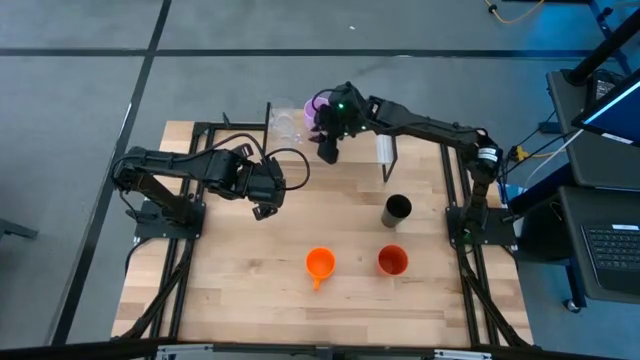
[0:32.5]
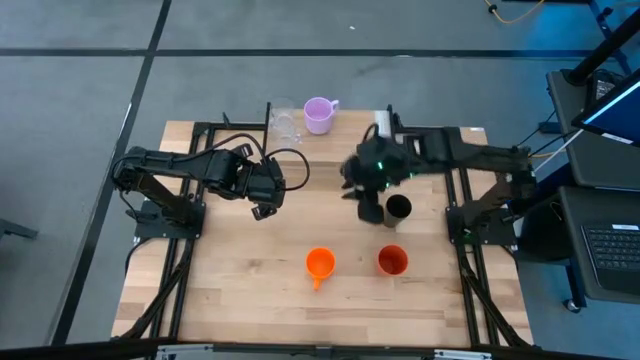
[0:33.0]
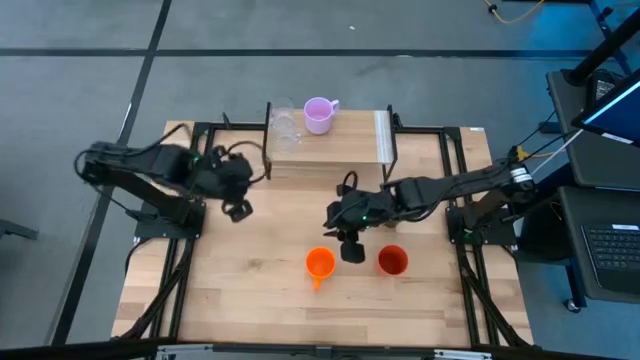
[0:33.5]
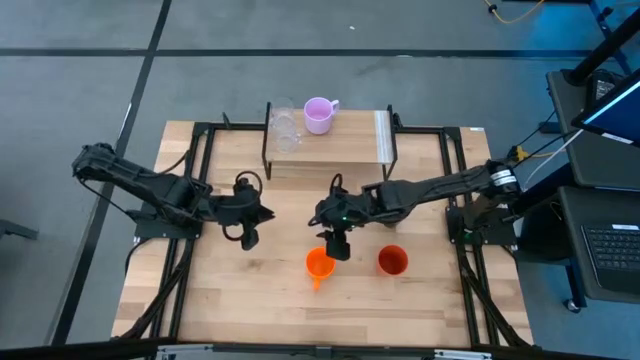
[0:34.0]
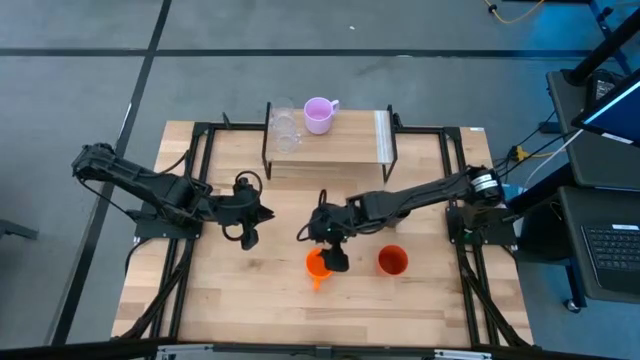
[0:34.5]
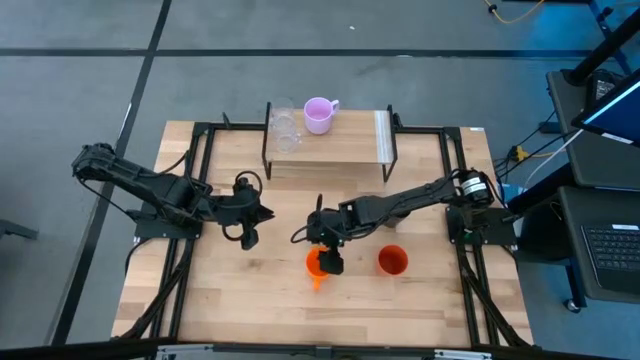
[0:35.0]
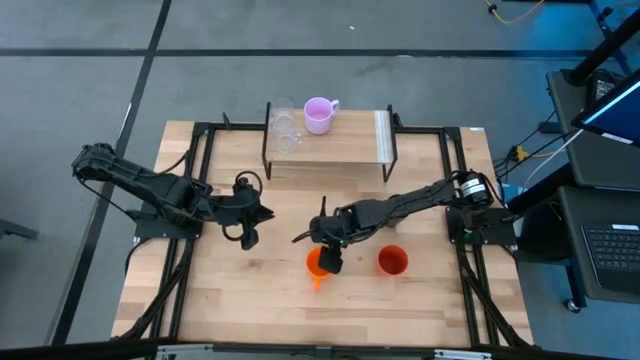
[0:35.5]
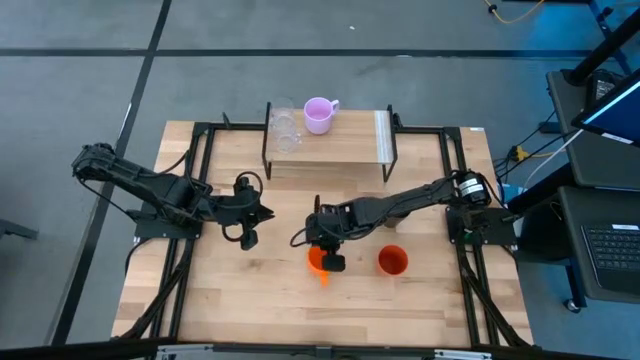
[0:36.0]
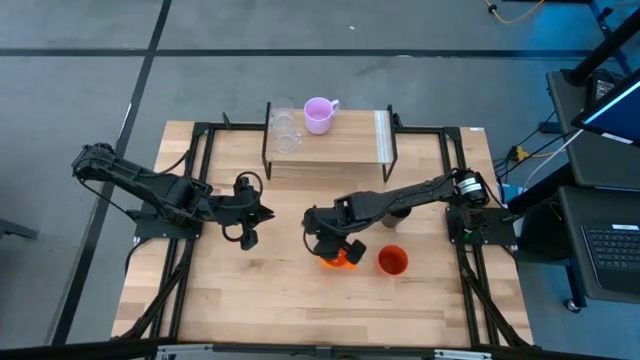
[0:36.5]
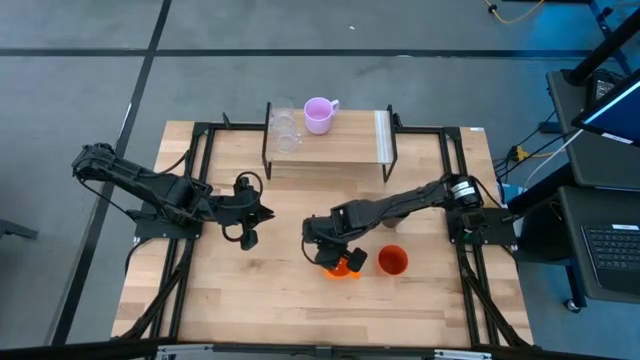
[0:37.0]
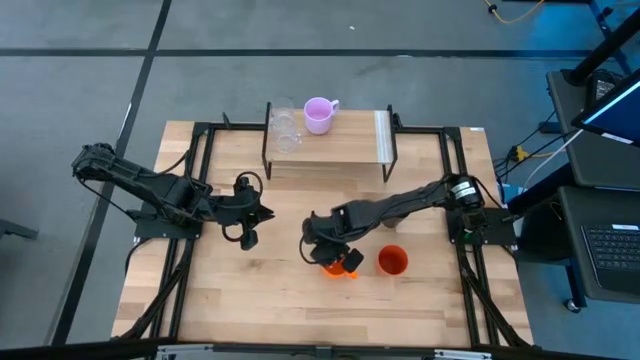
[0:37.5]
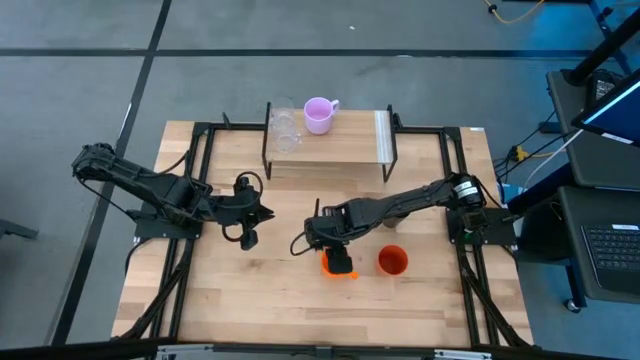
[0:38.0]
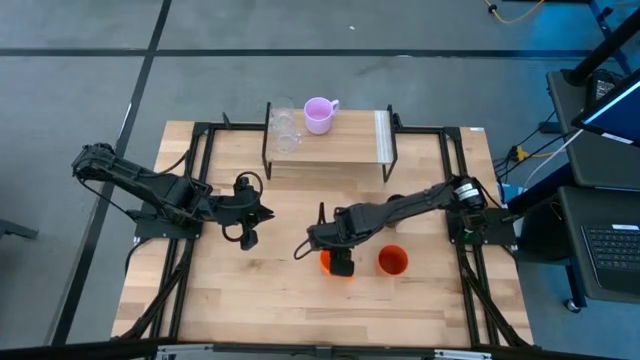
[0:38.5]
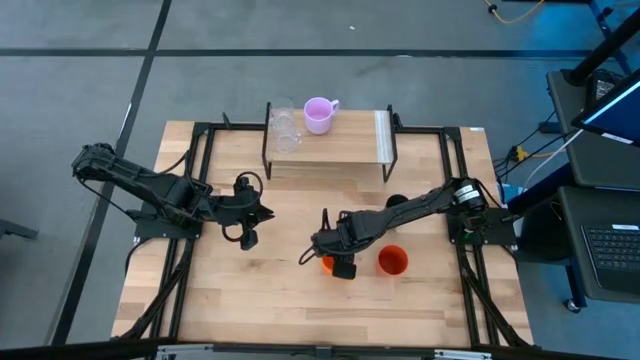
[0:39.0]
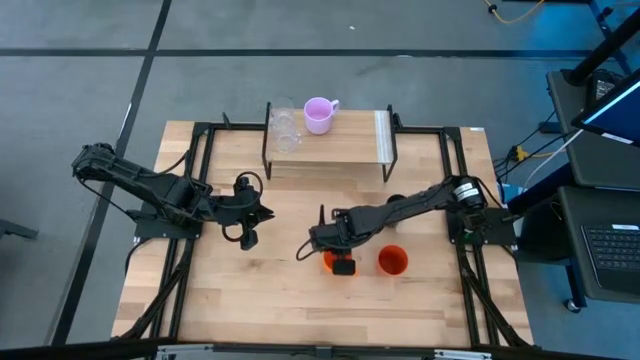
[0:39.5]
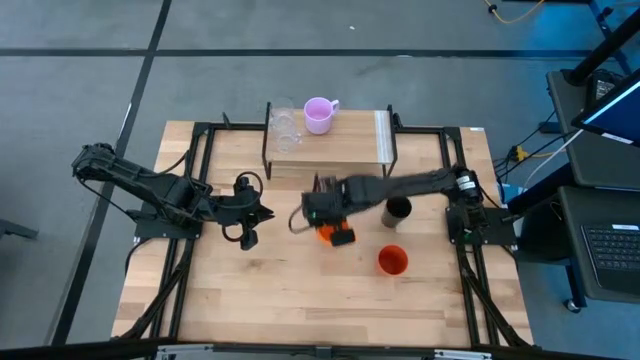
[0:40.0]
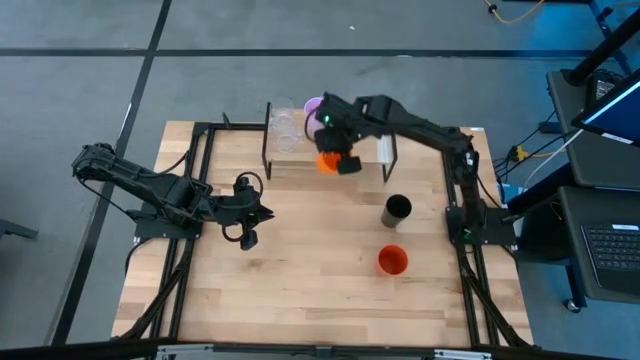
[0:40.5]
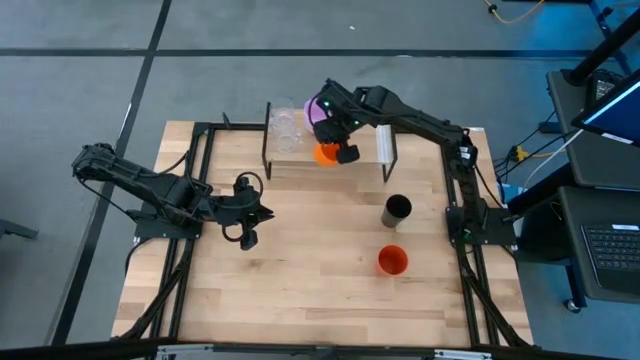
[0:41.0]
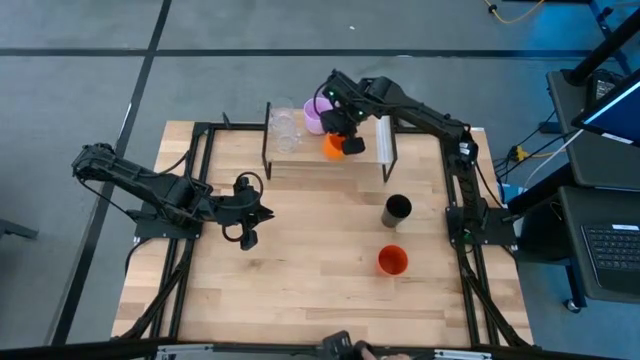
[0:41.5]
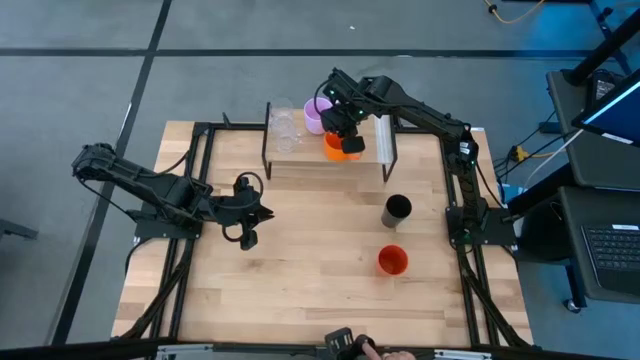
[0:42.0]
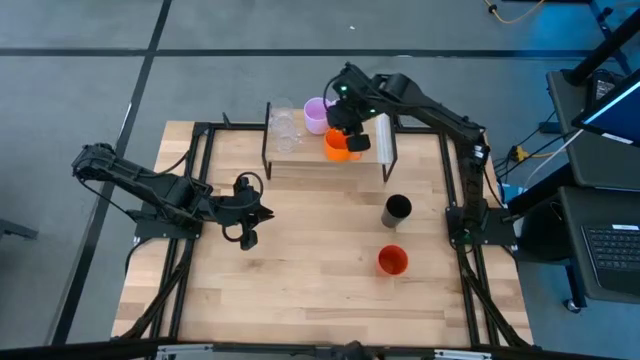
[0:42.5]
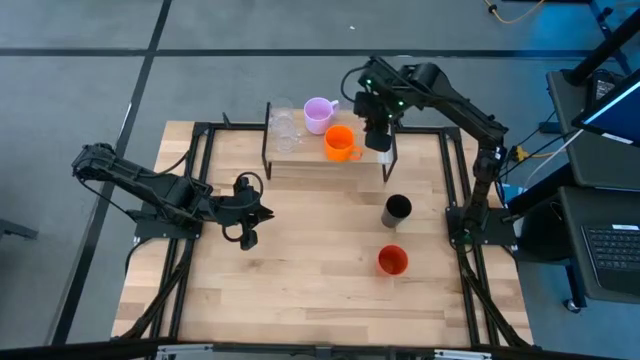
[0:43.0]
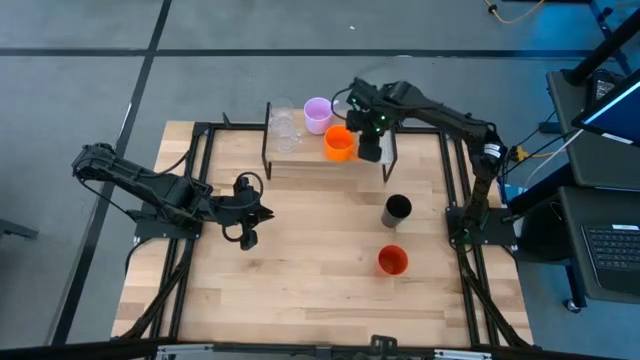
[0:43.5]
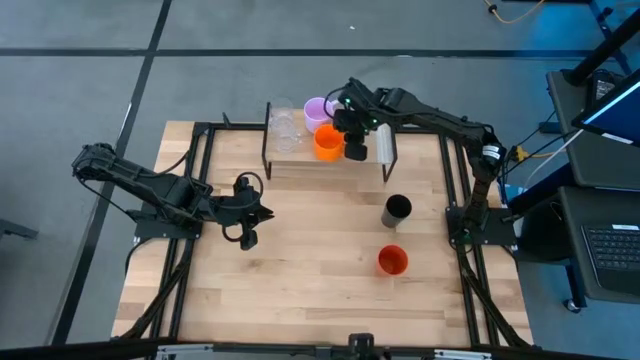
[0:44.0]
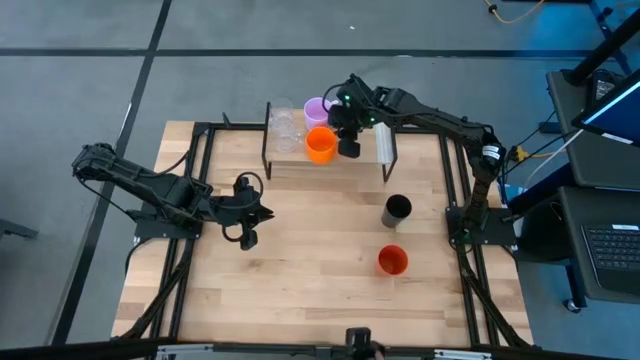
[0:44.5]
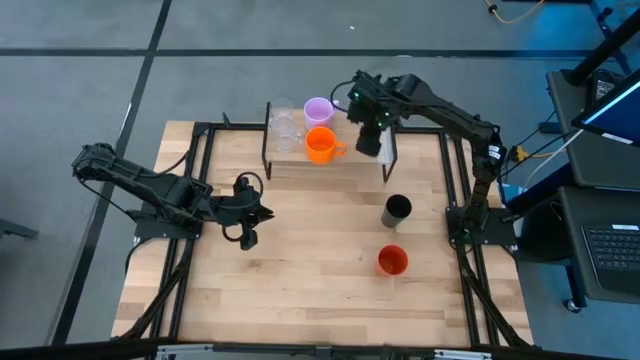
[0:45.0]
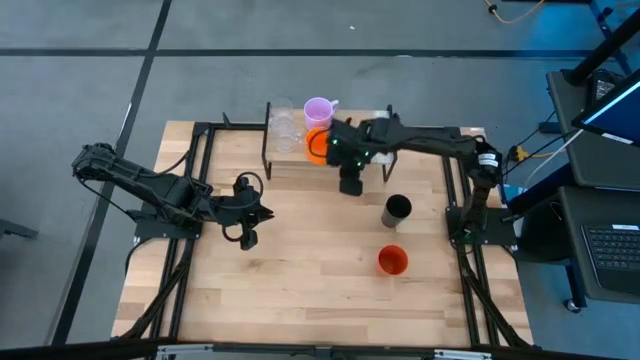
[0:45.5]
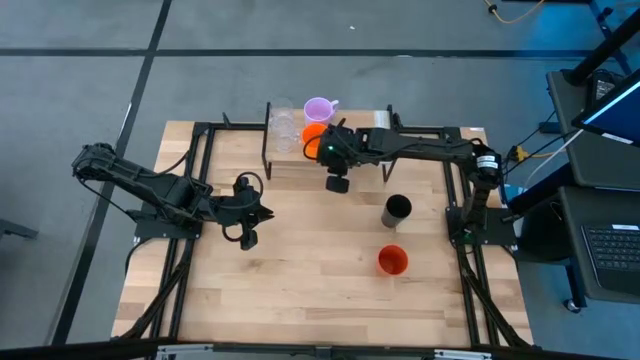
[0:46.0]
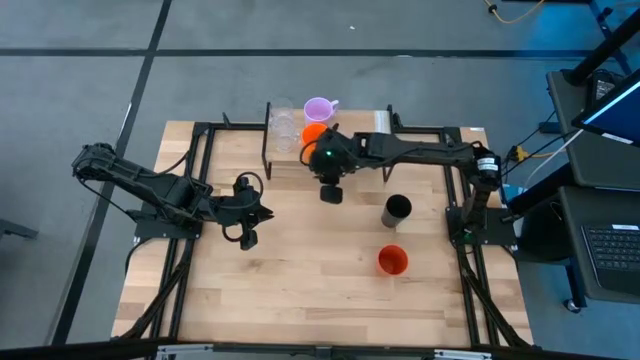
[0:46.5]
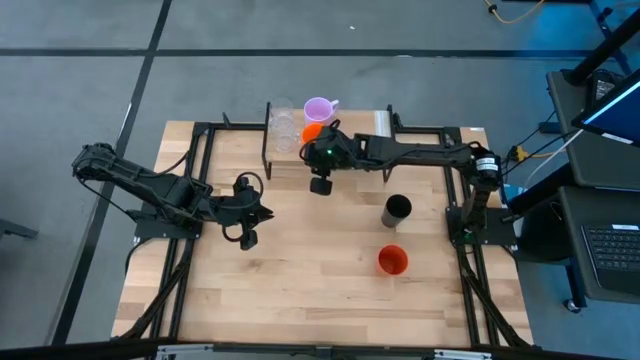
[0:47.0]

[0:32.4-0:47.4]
Task: Stack small to large cups/mugs on shelf
Put the orange mug on the shelf

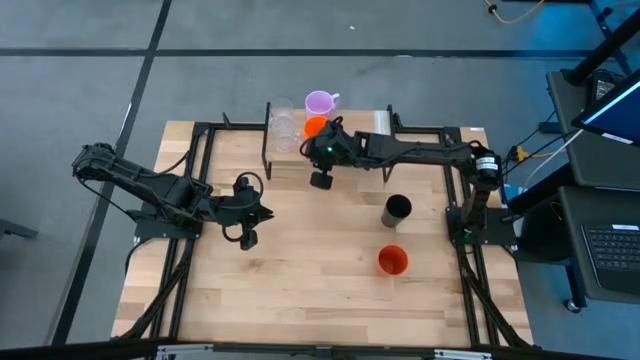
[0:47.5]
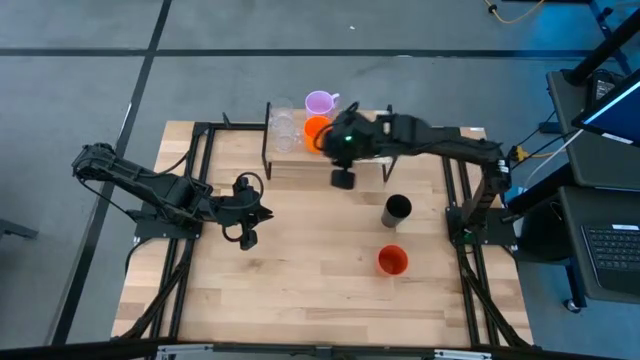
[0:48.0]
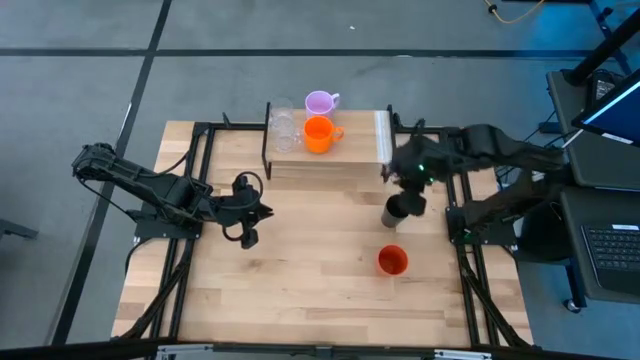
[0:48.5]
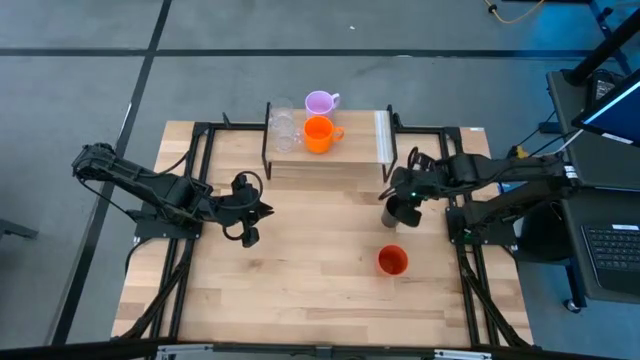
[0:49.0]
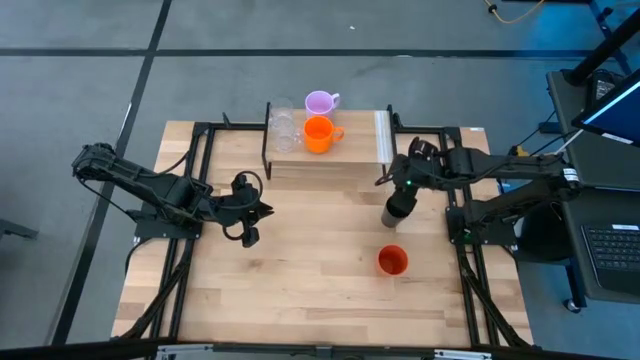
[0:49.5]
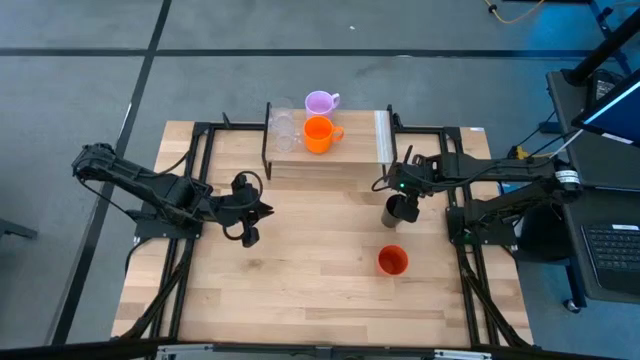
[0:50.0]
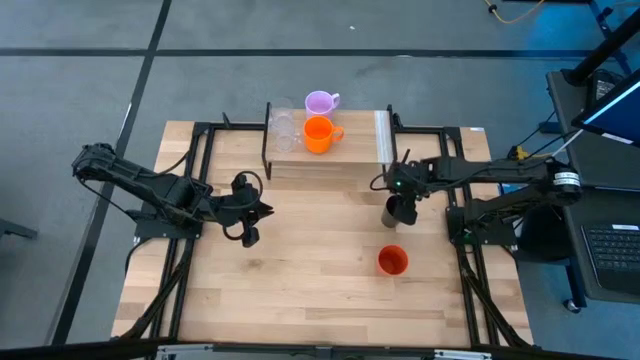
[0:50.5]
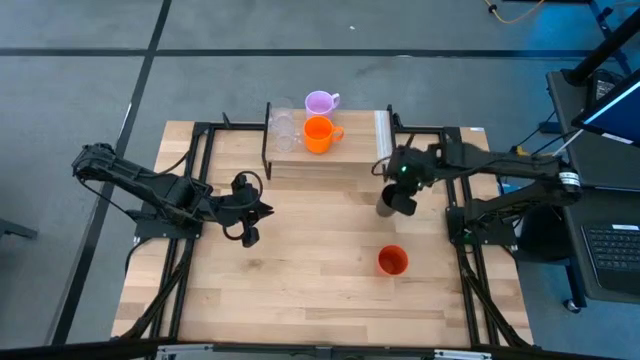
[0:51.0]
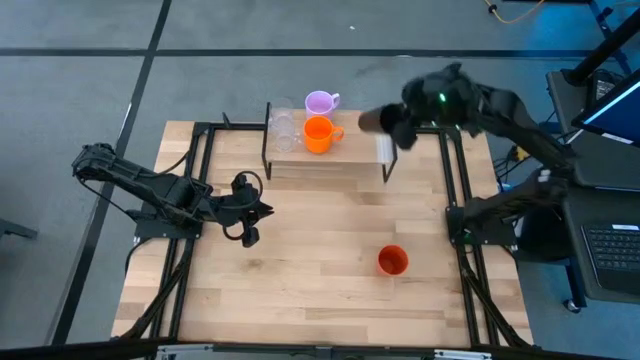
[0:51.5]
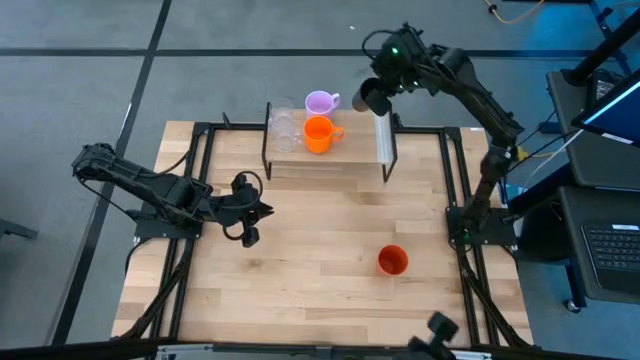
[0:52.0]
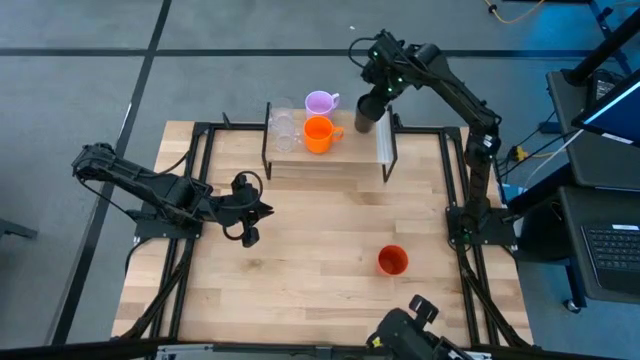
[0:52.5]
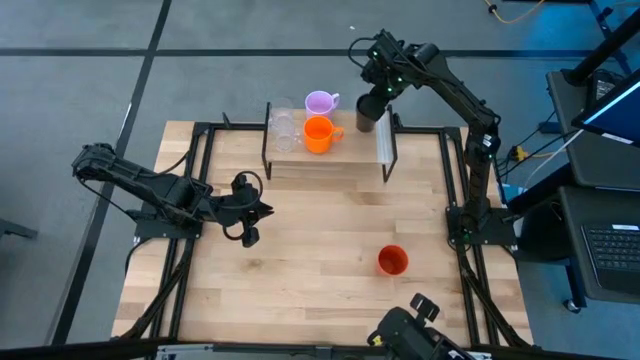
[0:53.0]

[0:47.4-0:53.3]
Put the black cup on the shelf
